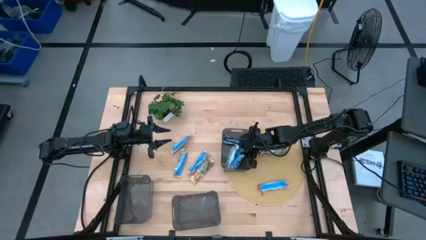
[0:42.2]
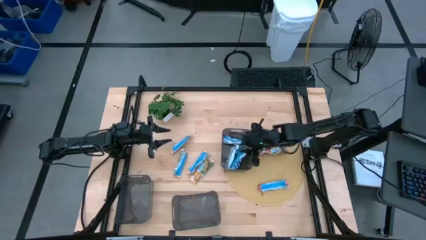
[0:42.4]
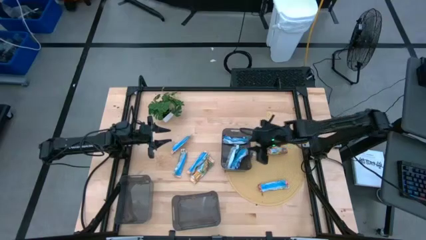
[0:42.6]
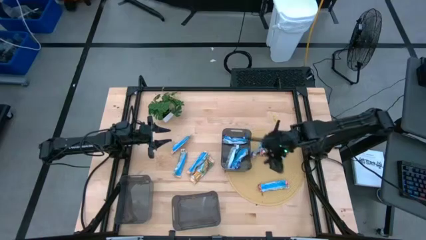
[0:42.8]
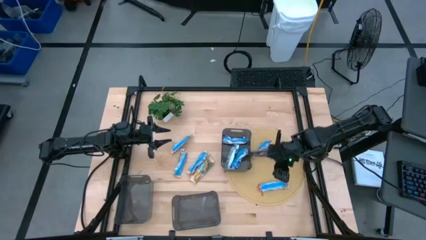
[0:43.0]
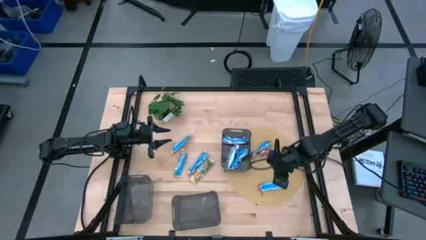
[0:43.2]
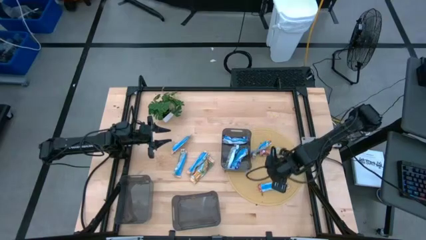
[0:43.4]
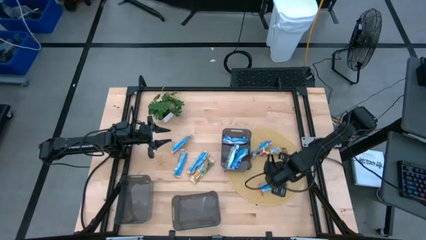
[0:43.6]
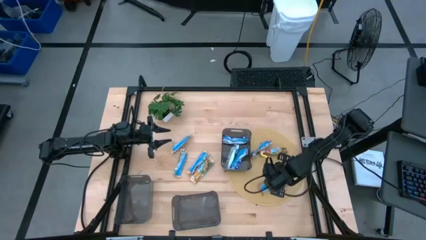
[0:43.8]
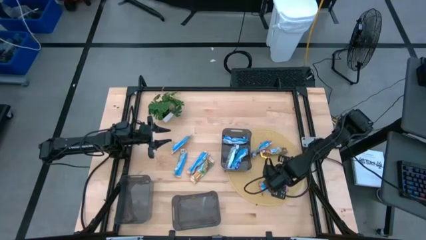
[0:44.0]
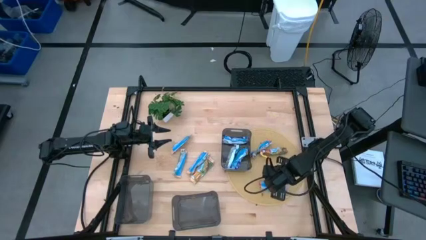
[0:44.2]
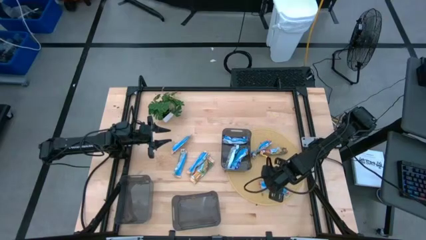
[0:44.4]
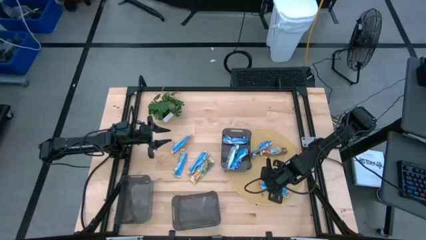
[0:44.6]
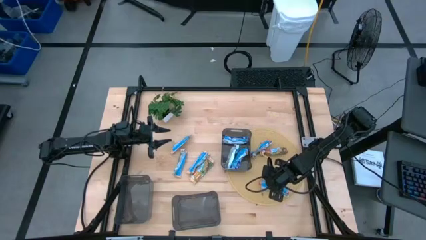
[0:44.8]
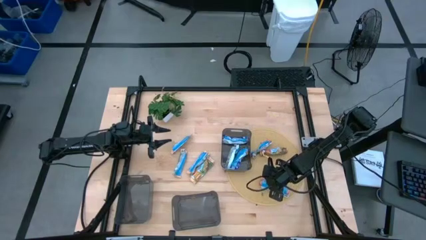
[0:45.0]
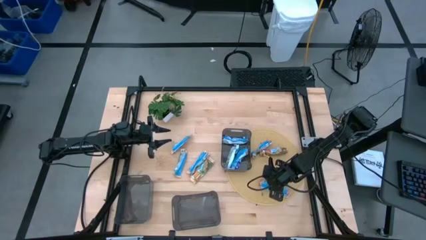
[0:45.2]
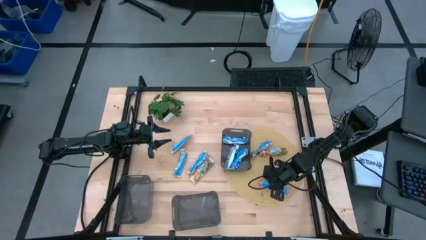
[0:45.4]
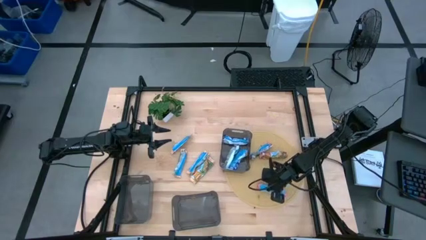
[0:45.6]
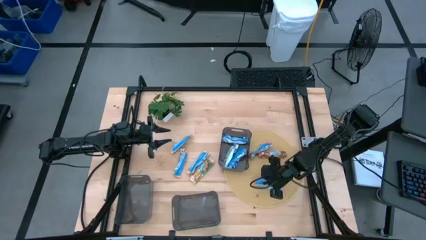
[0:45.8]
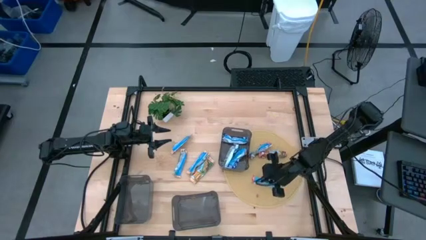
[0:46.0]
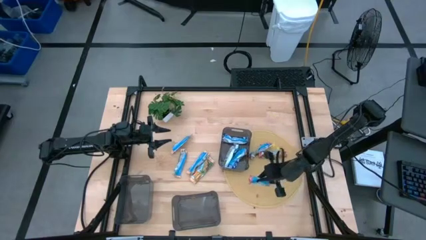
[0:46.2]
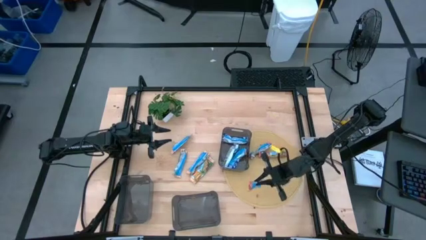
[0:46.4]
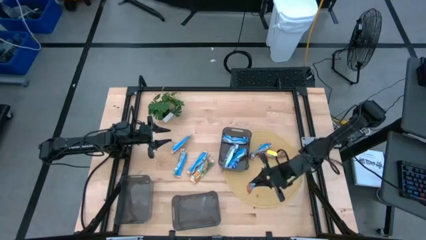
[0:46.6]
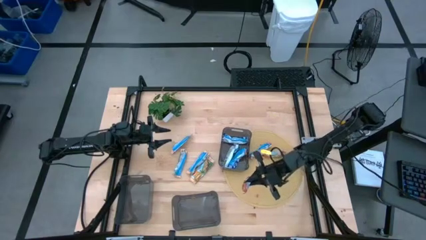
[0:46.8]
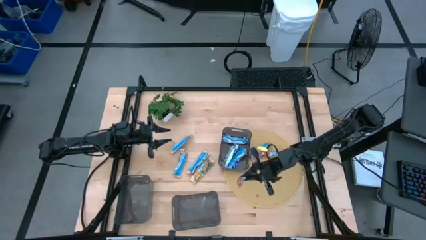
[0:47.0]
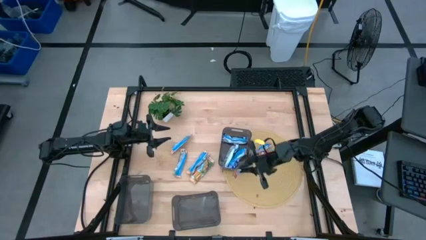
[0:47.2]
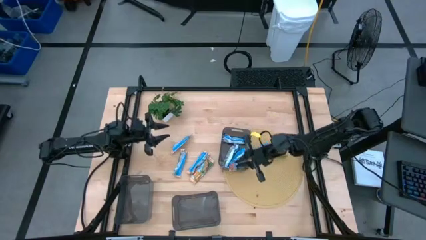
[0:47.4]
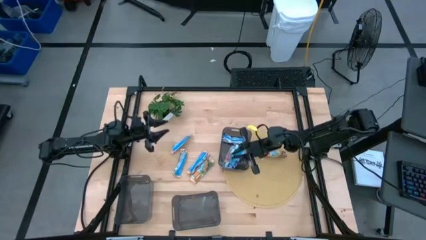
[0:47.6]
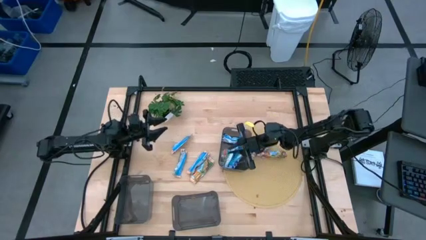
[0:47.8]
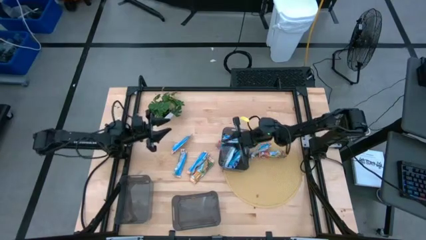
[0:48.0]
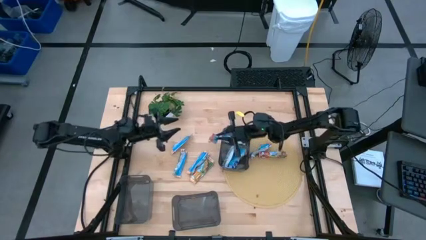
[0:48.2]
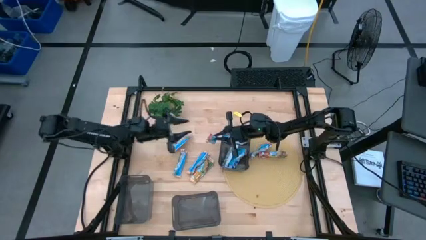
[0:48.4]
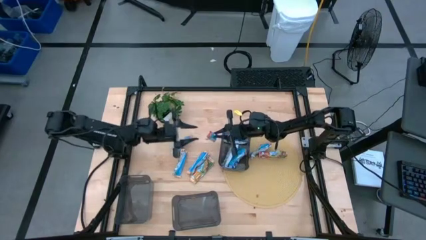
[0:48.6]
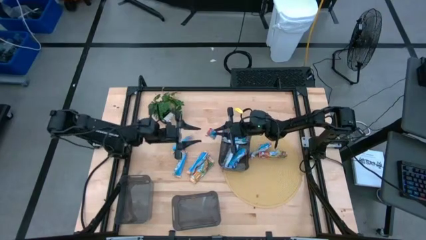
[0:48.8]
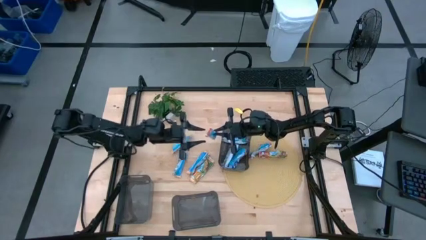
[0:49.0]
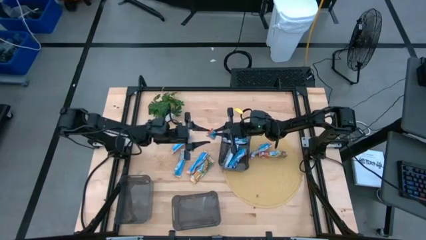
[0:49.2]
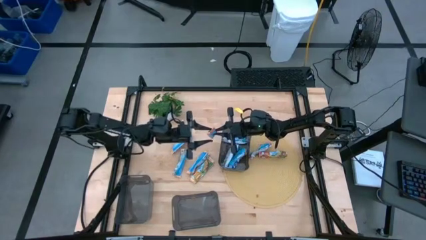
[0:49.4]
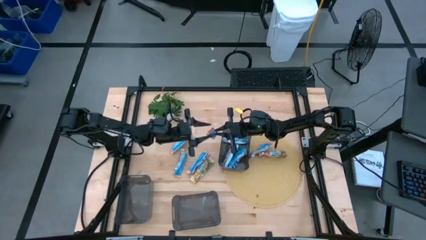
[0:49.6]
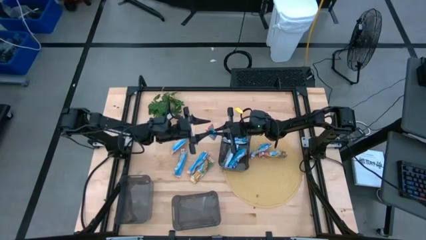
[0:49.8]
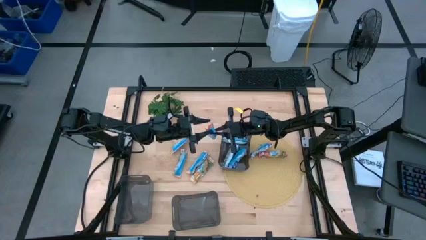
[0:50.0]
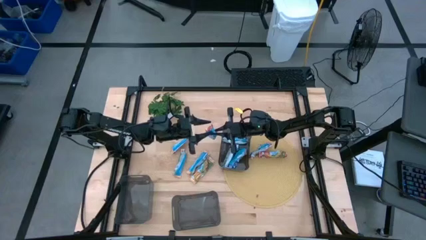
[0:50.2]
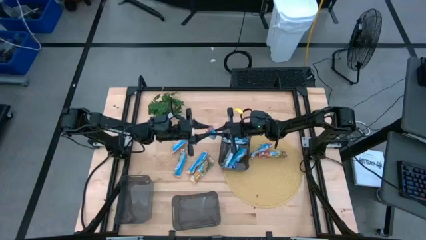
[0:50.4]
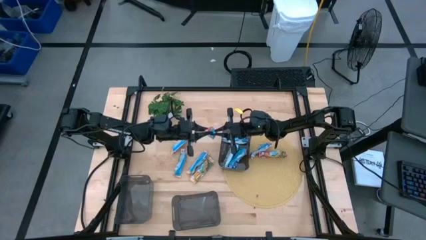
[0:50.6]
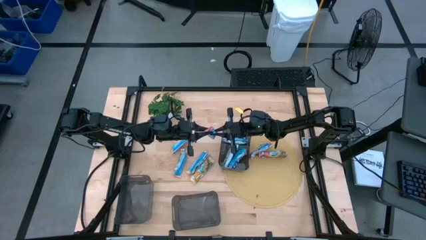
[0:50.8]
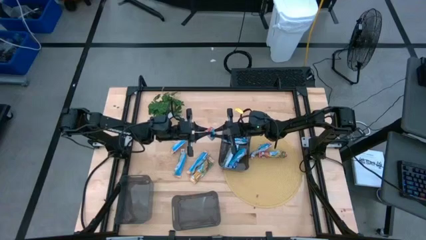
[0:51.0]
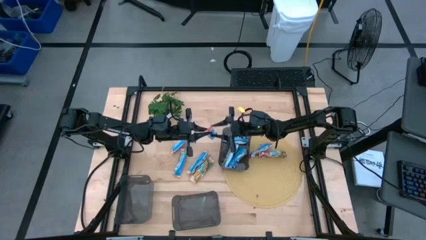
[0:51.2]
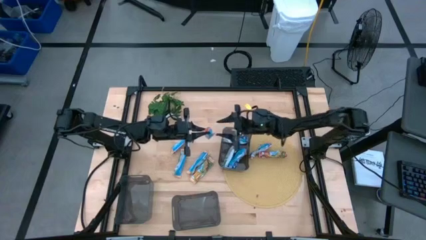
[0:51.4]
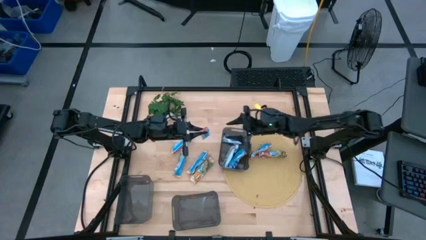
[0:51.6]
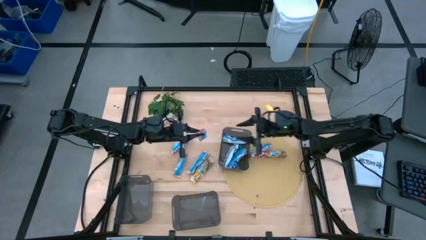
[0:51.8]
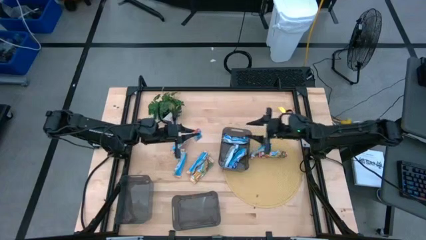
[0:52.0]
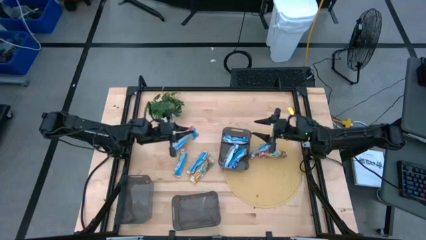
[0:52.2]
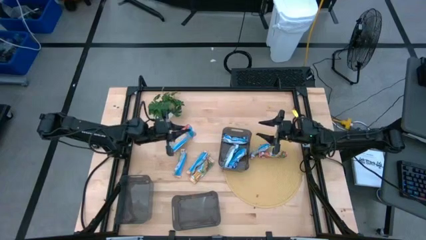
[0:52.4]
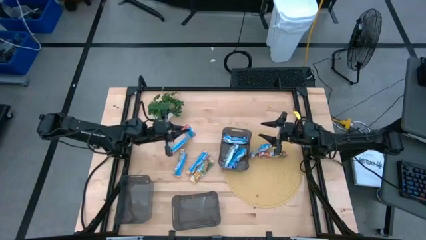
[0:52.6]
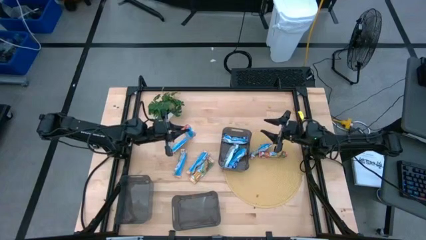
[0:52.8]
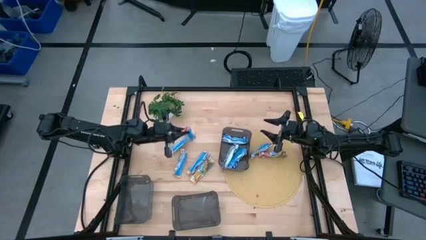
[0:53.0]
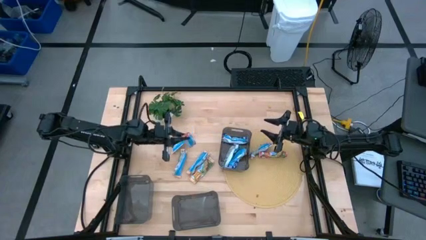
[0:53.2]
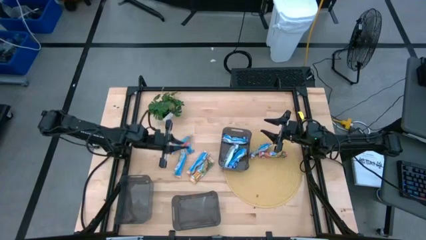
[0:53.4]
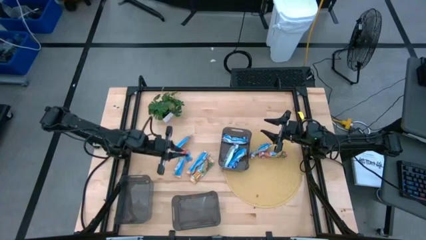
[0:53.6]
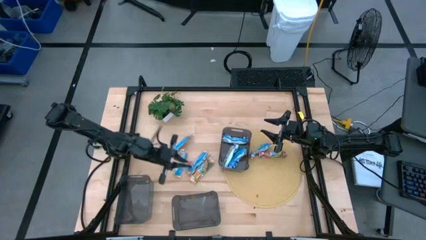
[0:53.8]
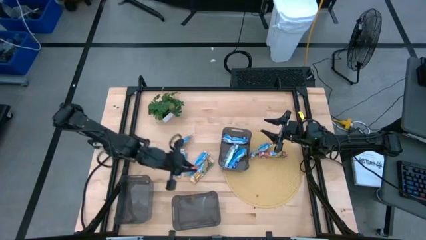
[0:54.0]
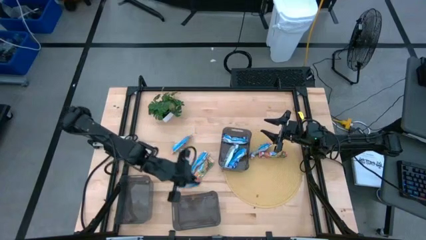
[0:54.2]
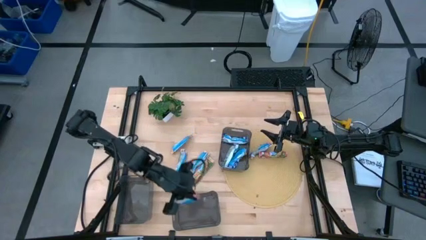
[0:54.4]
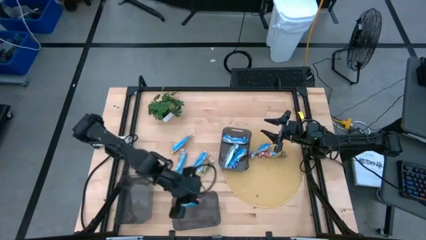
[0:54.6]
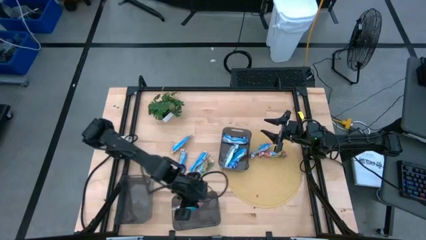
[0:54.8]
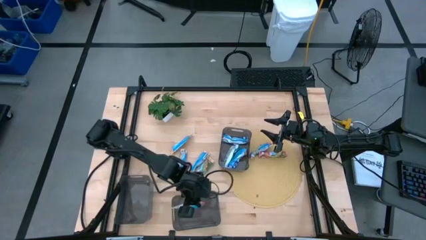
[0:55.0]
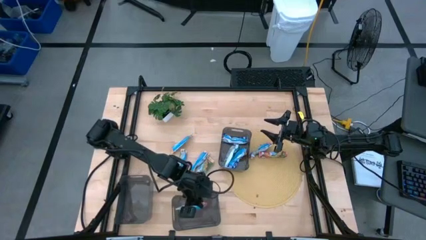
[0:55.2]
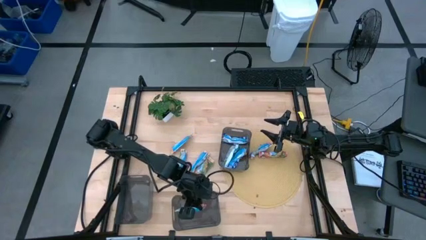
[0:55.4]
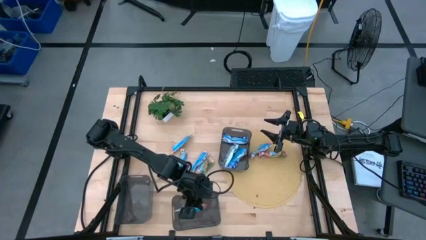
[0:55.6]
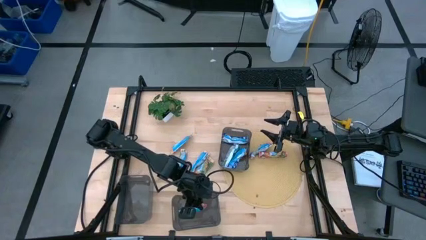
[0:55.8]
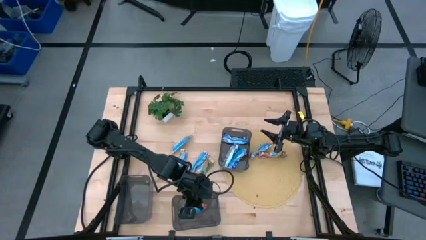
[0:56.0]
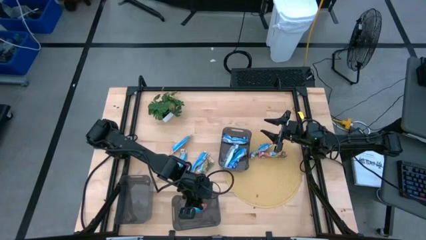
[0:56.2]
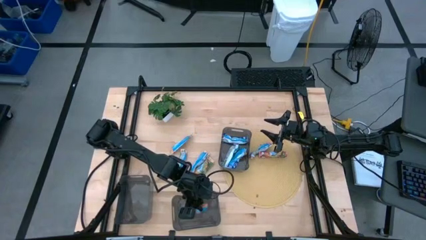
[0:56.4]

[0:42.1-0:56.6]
Task: Pick and place Granola Bars by type
Put the bottom red granola bar into the bottom right black bin
